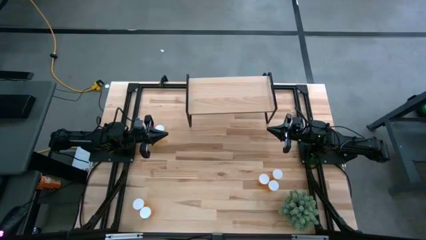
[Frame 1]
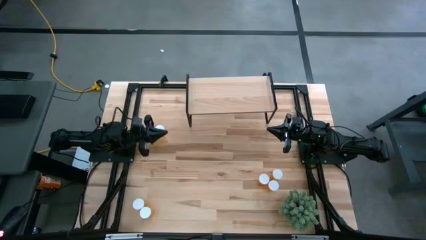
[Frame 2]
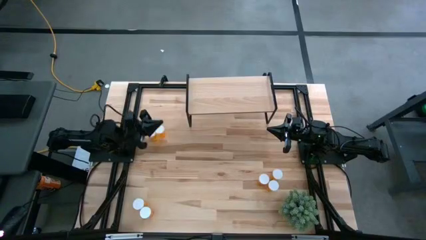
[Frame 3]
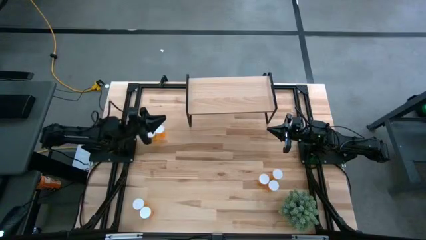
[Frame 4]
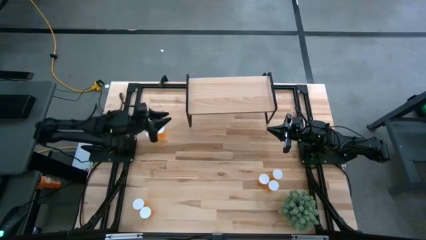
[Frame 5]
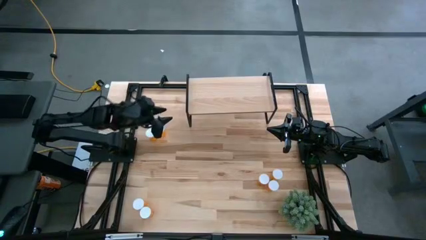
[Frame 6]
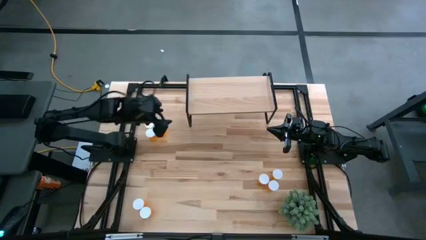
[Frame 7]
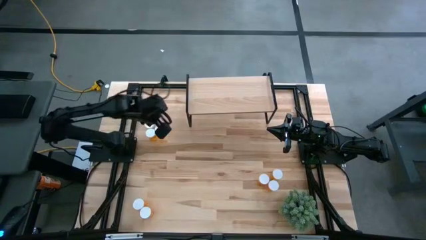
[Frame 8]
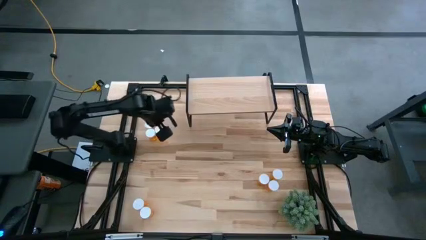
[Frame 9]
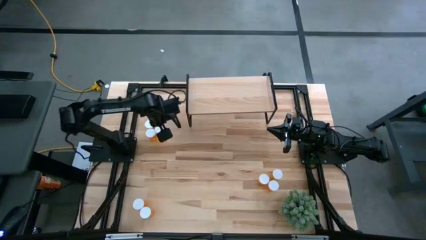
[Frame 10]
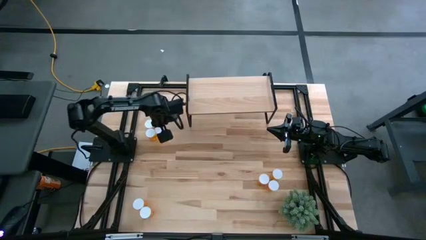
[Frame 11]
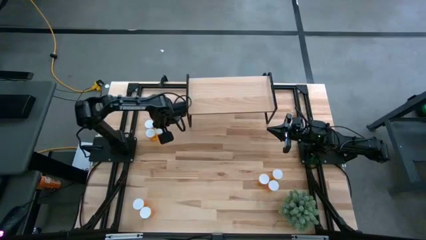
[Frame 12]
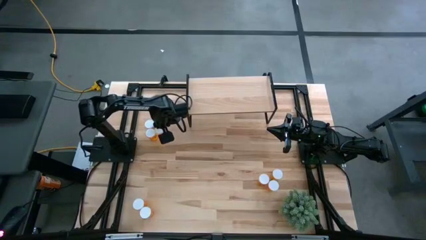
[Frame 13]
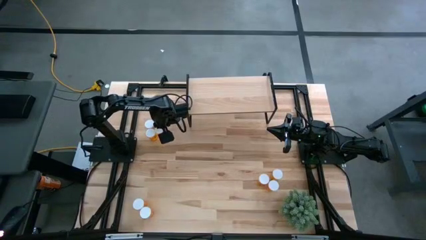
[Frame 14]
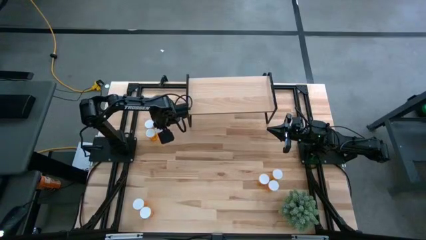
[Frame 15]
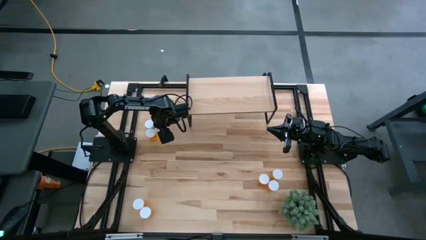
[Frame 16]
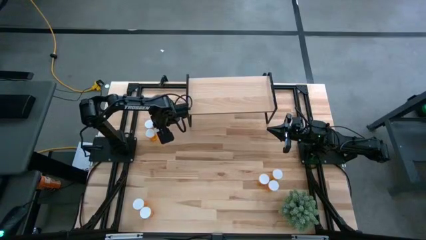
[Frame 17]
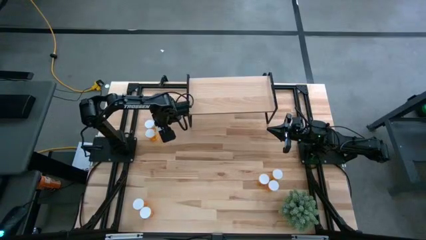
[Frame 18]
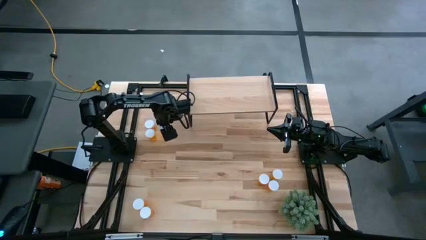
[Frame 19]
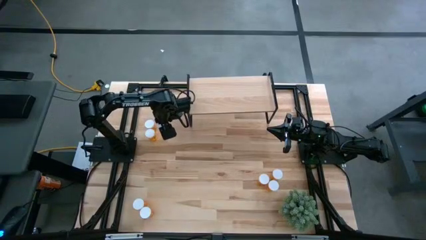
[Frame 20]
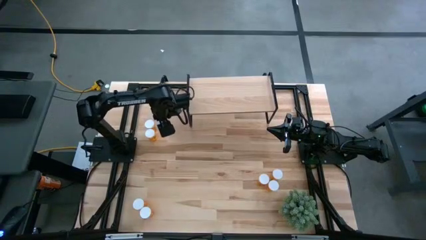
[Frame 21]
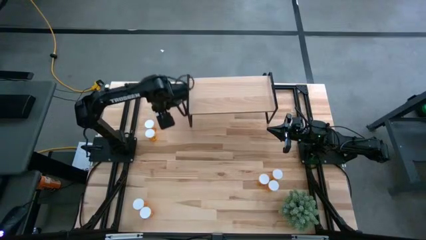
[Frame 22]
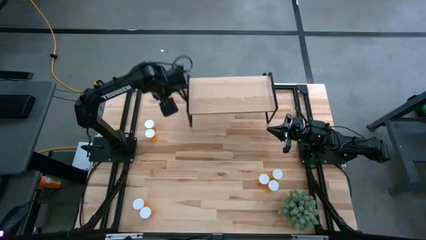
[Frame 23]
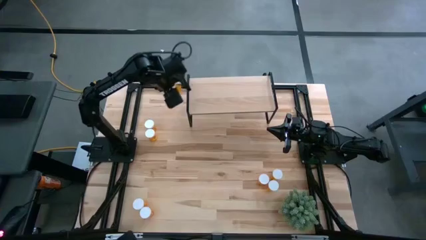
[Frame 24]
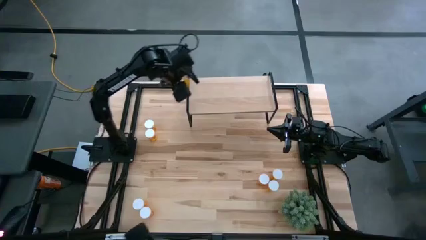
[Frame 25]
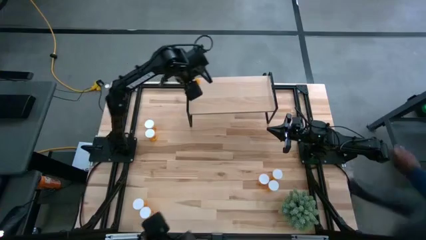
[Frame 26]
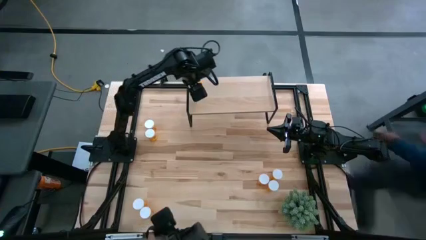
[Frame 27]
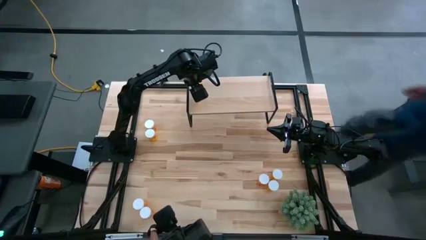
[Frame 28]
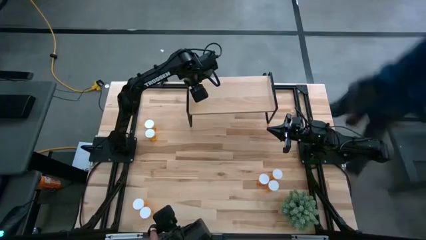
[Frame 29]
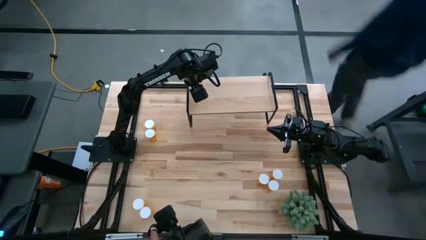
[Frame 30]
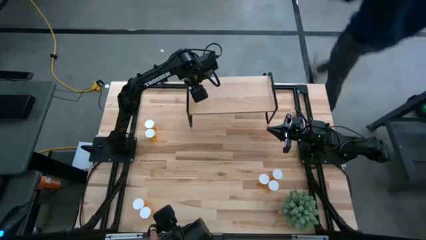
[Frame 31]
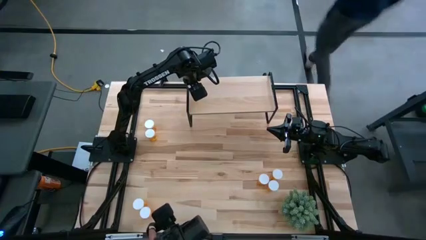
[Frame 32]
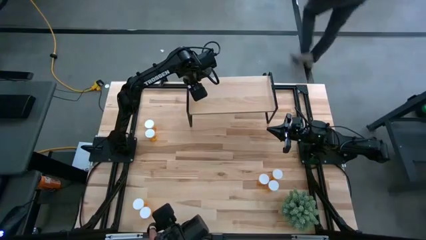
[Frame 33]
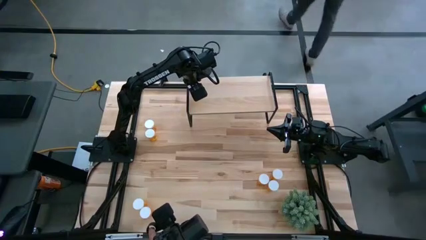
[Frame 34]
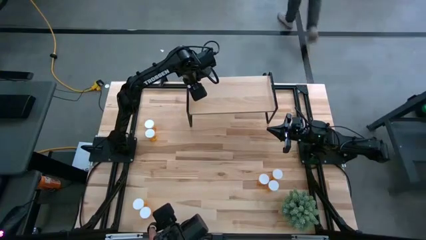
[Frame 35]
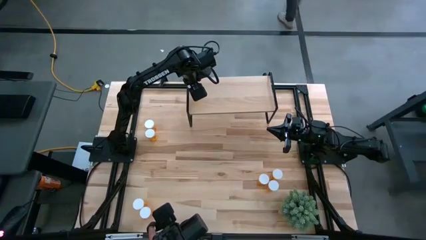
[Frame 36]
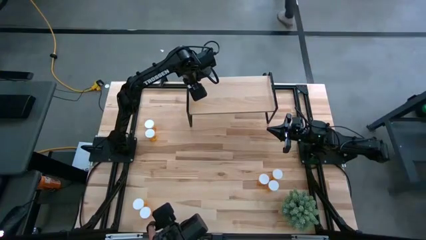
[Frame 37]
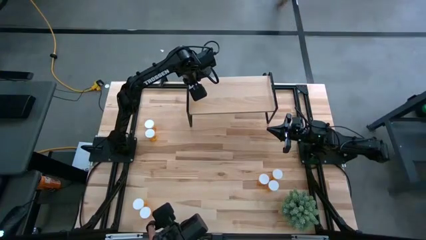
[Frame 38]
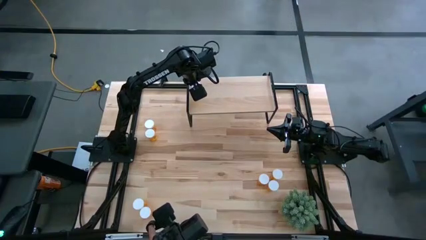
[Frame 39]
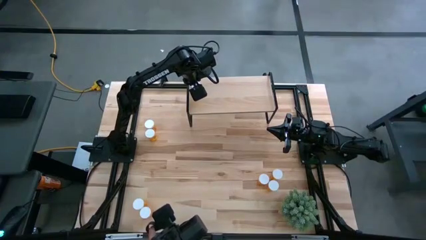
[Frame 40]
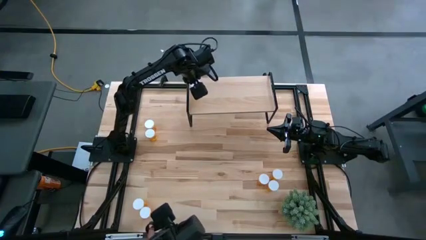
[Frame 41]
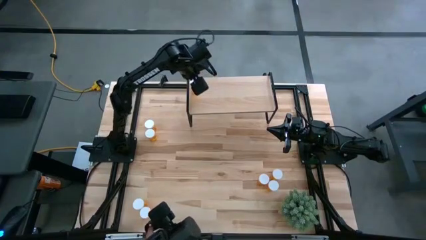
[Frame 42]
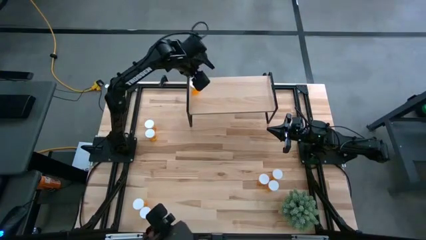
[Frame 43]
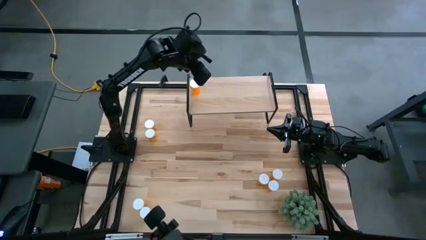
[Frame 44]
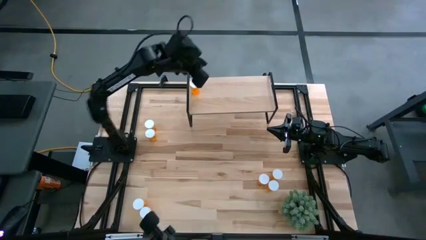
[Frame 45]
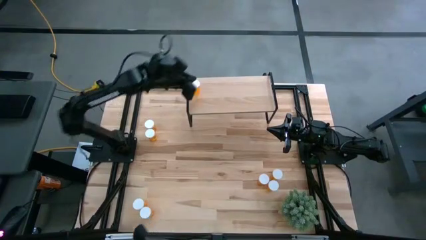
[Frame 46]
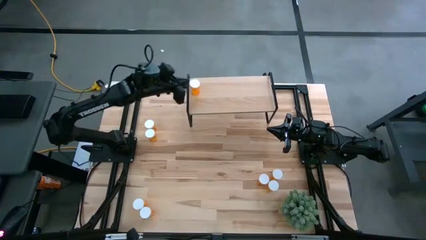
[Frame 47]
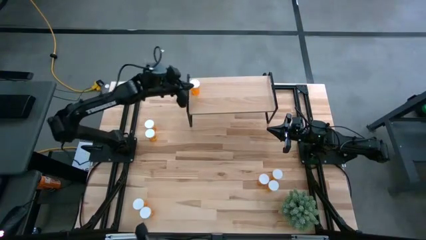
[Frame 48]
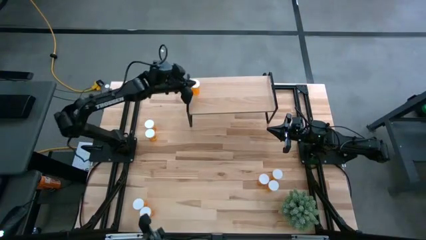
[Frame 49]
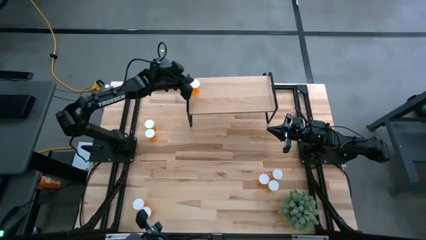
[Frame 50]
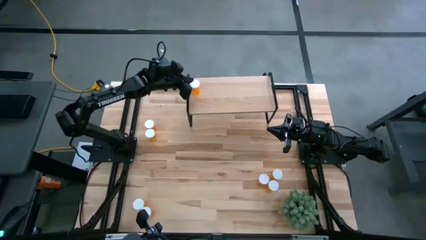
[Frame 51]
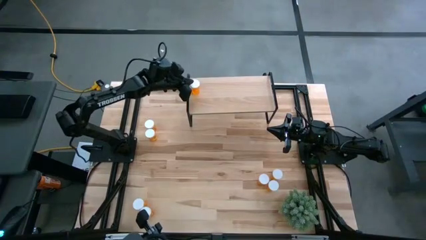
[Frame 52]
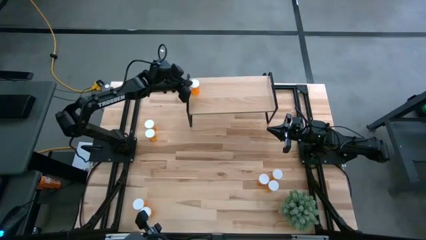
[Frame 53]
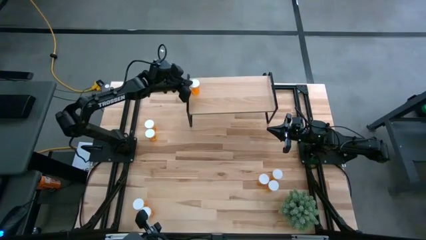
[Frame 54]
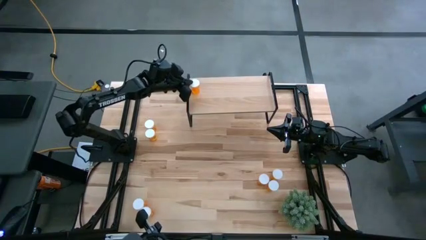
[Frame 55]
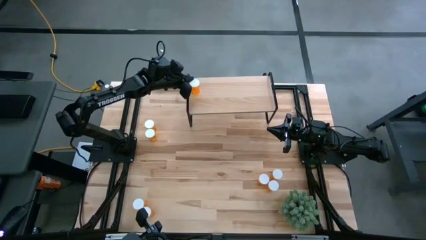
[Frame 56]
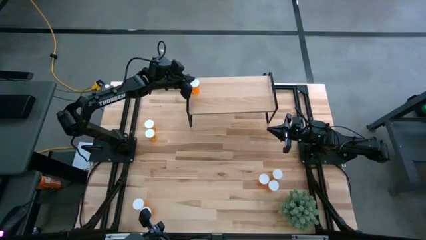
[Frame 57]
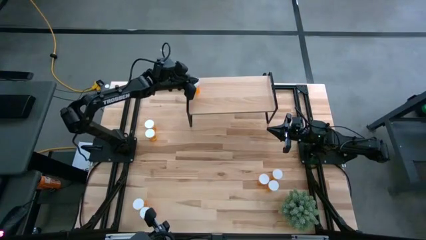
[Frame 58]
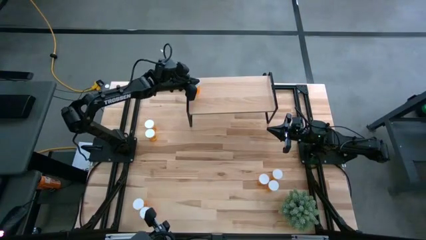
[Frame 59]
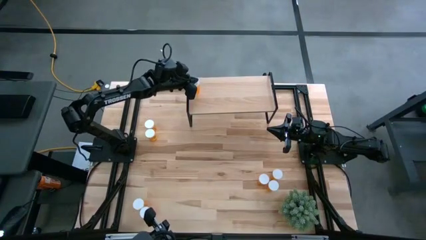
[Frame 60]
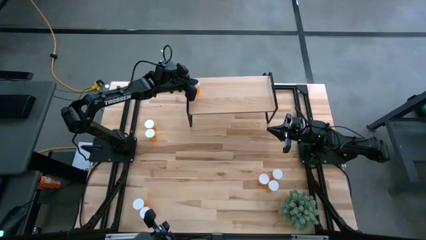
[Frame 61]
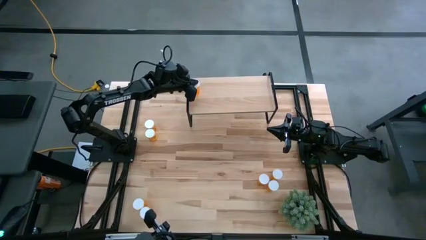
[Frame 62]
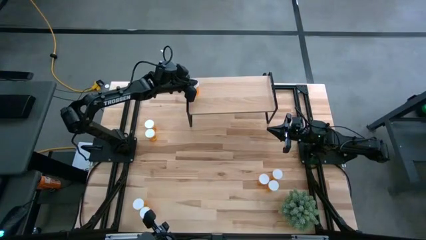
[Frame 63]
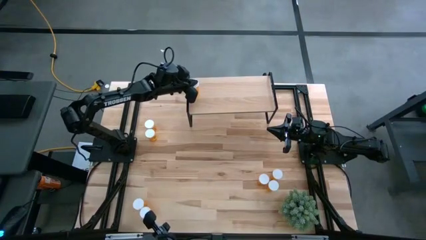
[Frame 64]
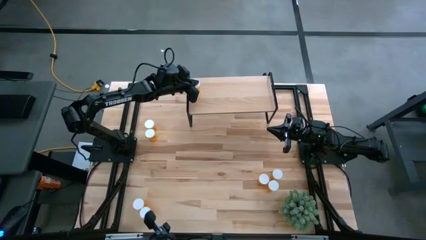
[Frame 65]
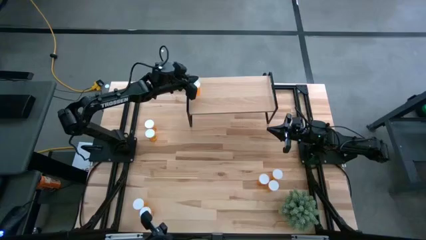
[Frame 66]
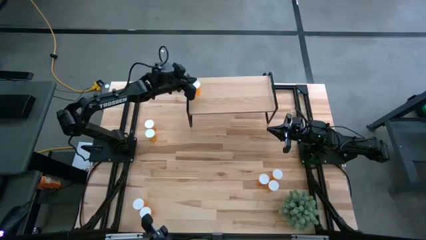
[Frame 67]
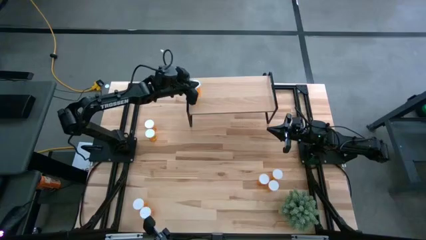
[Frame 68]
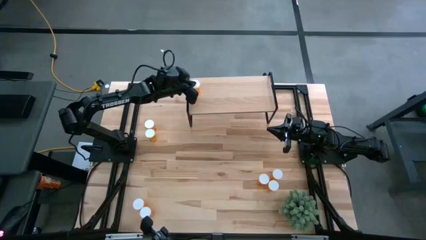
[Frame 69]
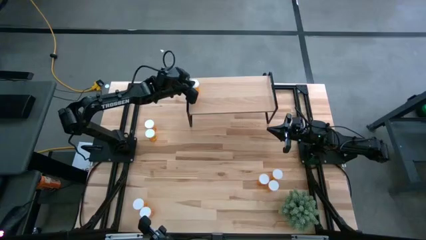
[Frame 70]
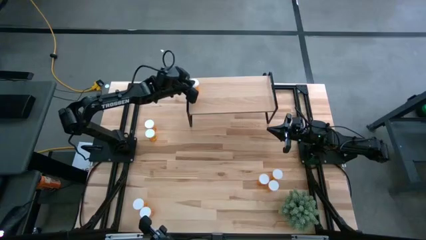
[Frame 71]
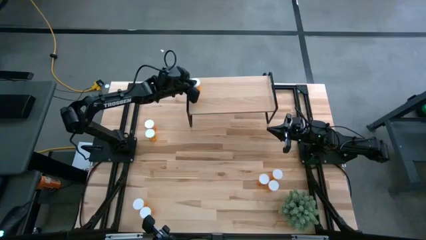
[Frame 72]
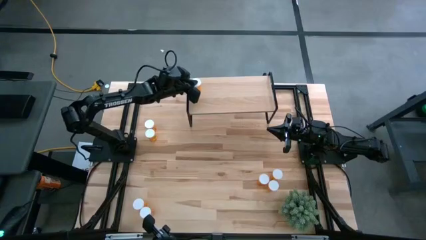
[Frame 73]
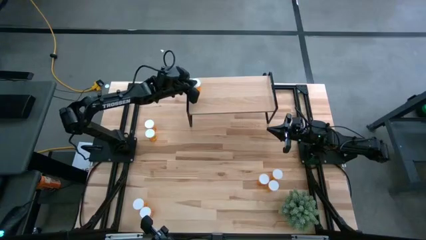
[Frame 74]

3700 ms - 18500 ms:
Task: Pick and place medicine bottles onto shelf by color
Put the orange pill bottle on the shelf
